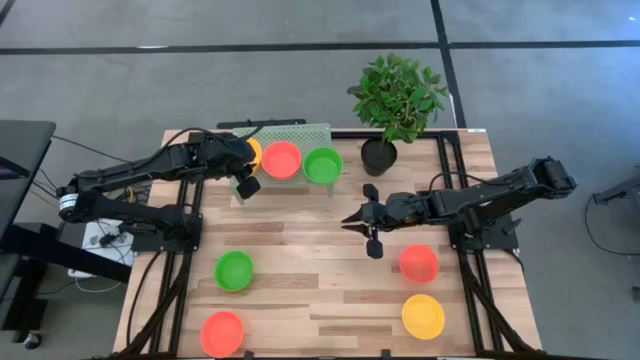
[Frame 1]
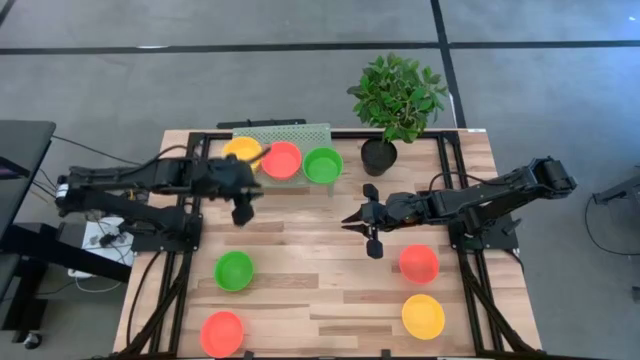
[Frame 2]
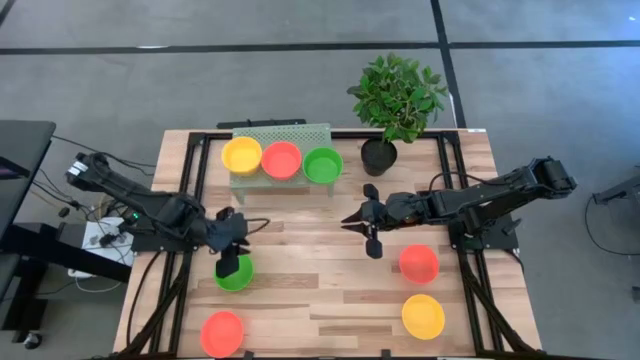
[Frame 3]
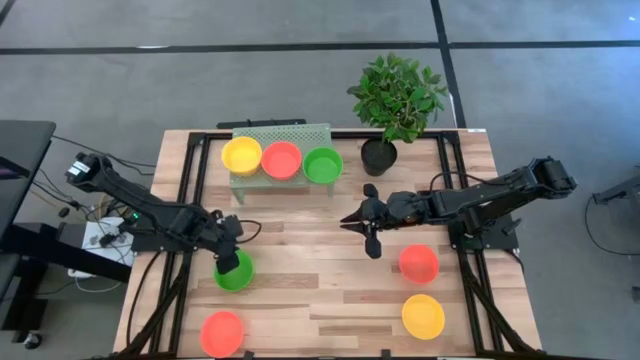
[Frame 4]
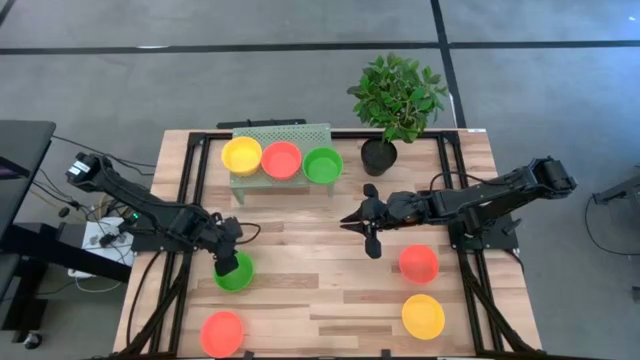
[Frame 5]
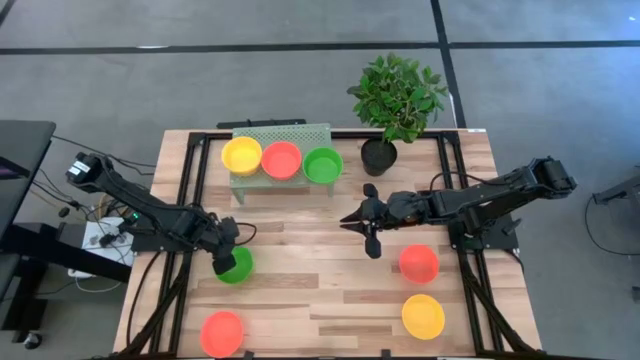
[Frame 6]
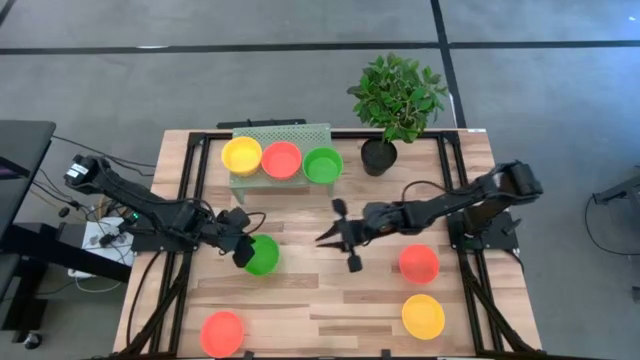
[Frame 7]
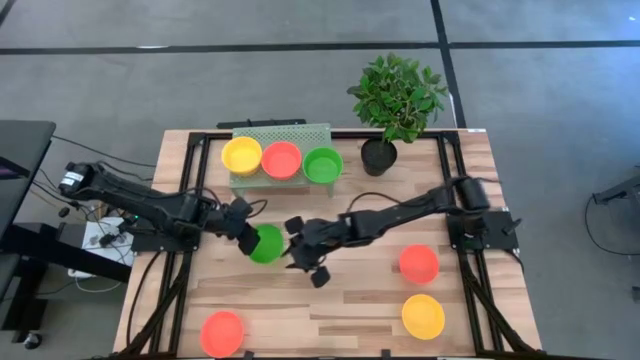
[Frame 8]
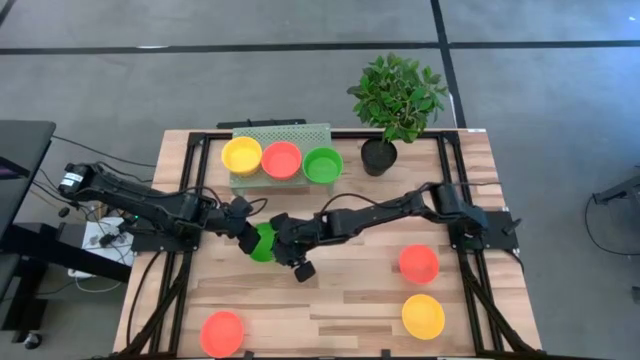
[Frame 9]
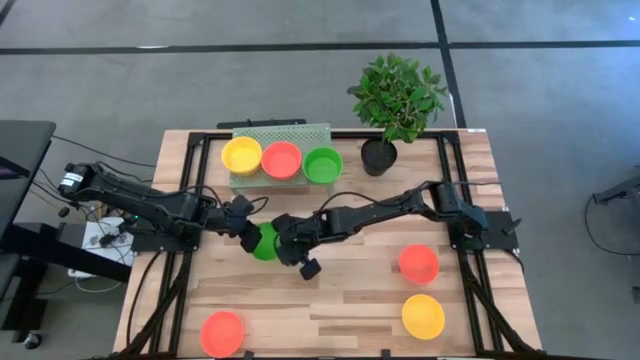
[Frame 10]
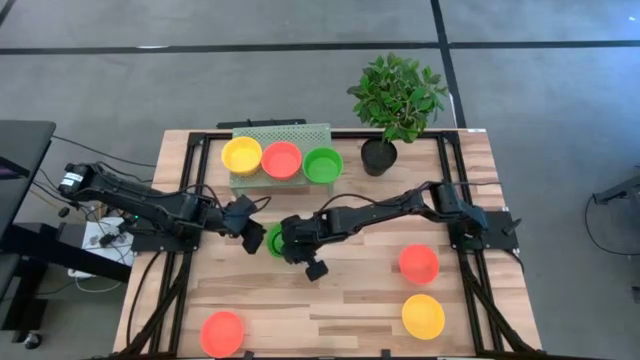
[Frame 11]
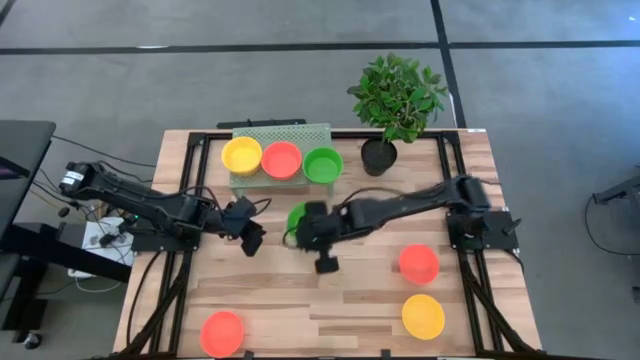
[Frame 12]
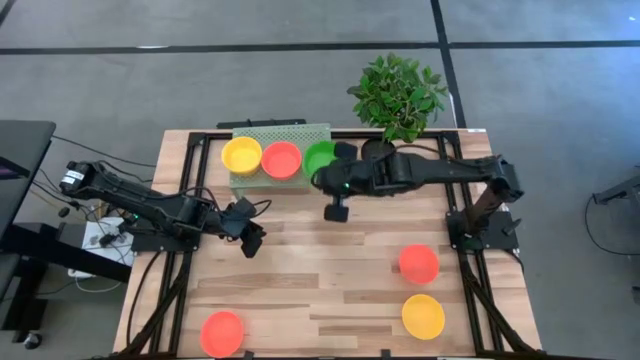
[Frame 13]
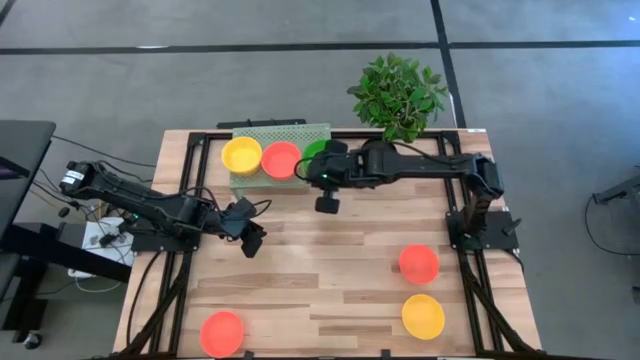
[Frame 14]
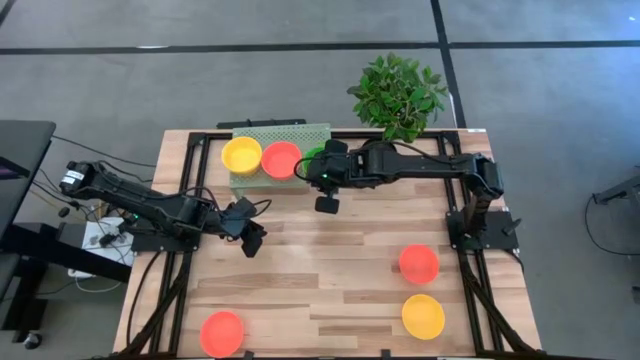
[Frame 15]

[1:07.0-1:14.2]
Task: Pick & Place Mini bowls
Stack the green bowl on top of the green bowl on the shelf

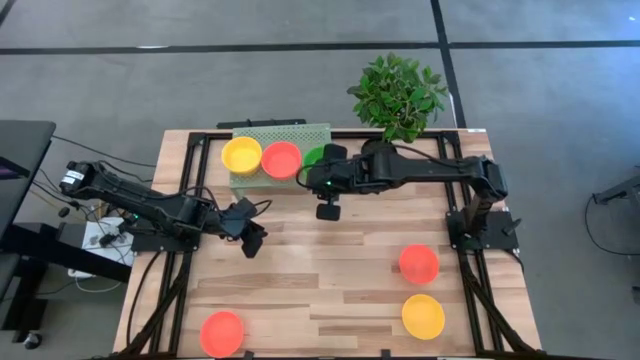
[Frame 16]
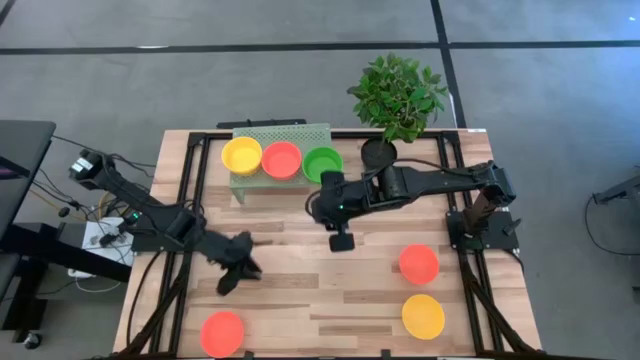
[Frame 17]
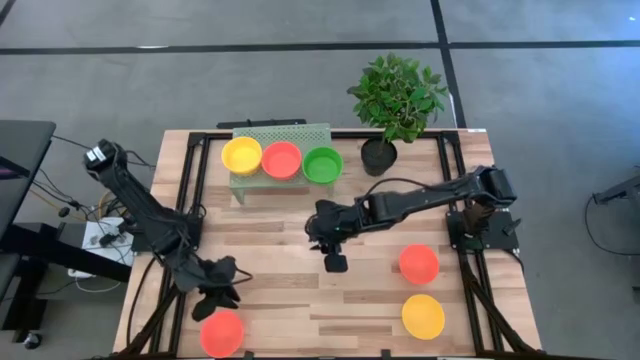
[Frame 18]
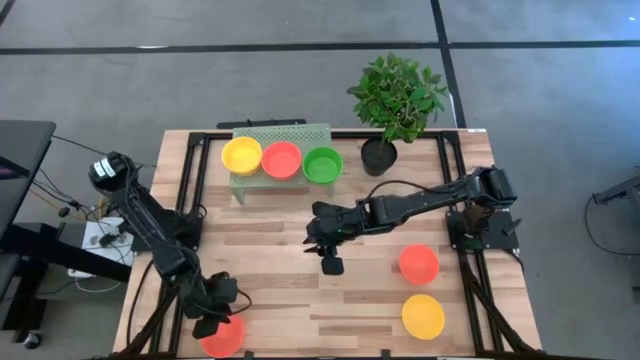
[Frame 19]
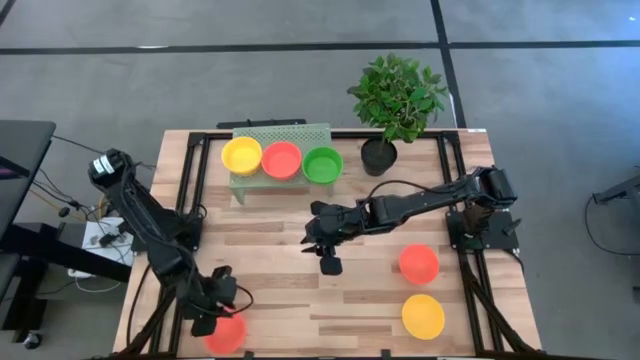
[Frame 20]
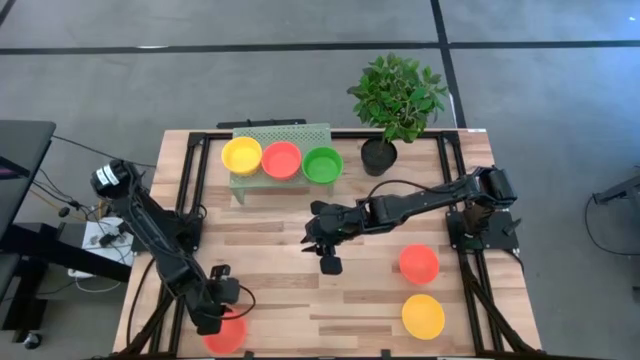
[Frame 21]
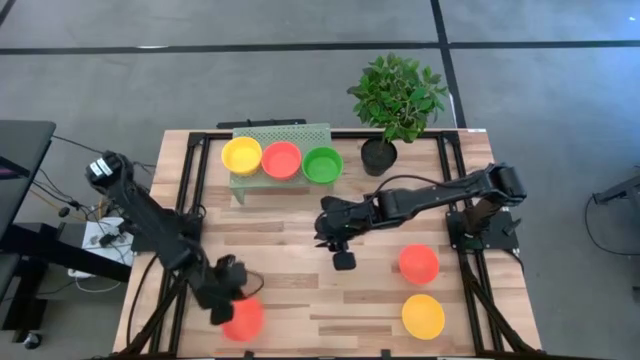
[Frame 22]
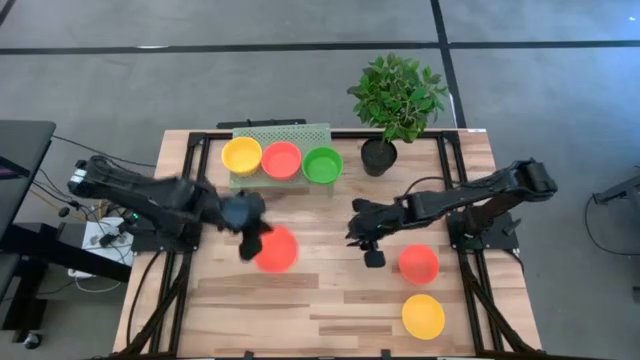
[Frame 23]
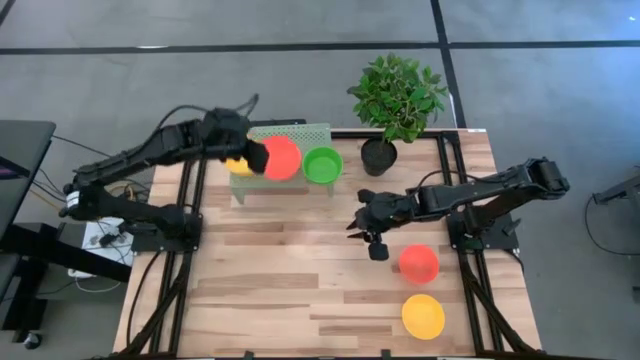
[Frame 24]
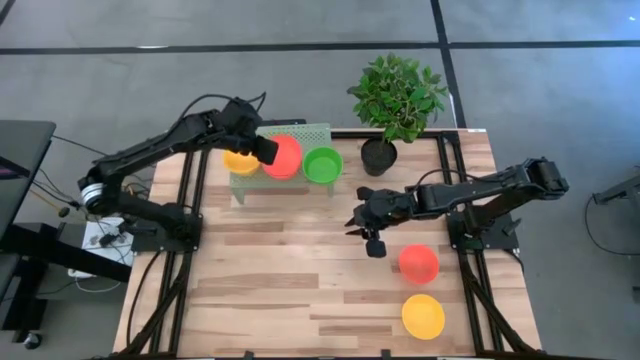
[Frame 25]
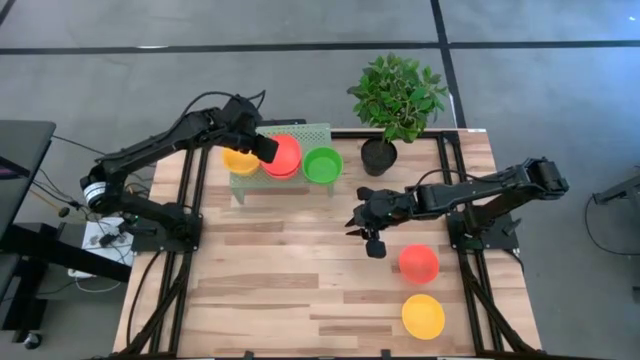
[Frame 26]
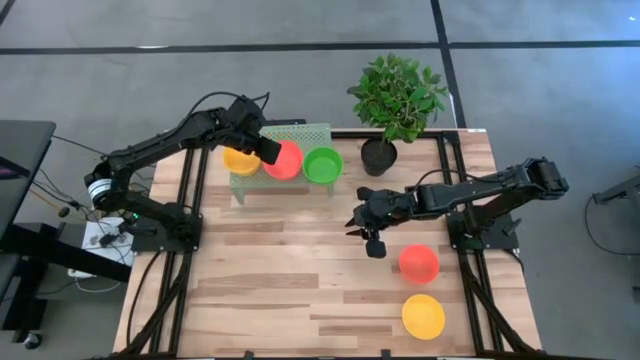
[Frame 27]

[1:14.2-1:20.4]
Stack the orange bowl on top of the orange bowl on the shelf

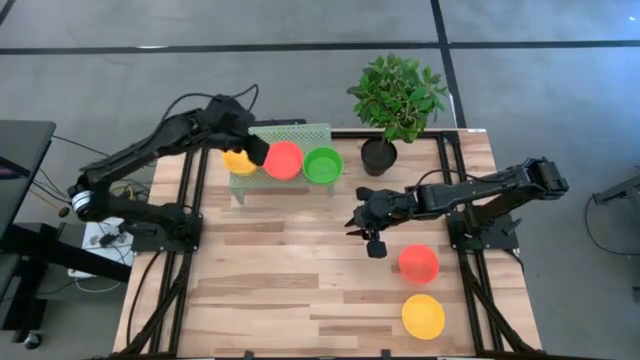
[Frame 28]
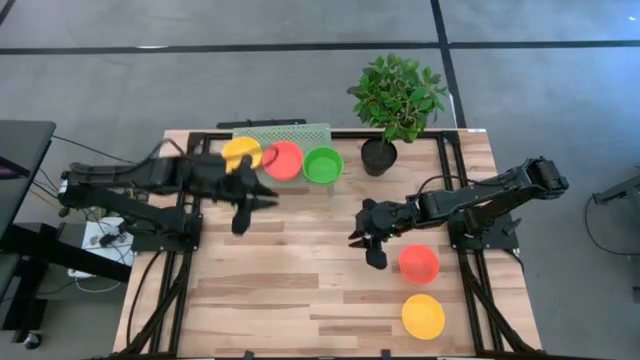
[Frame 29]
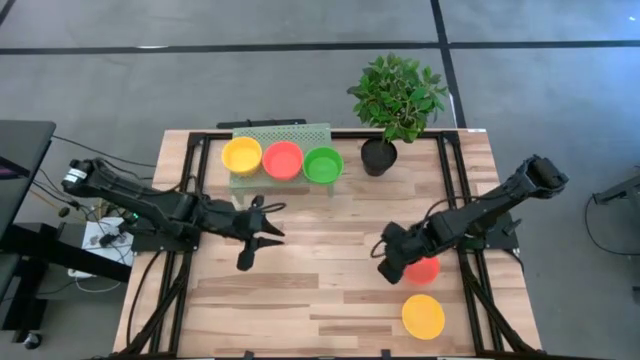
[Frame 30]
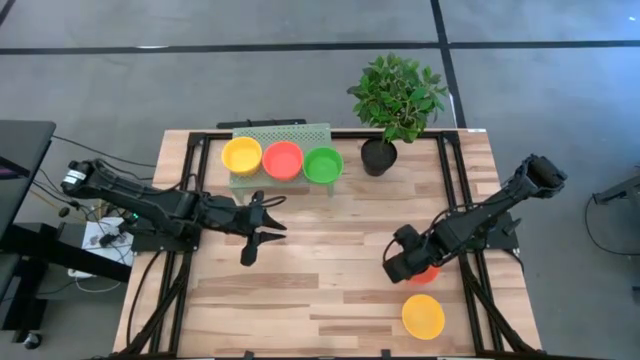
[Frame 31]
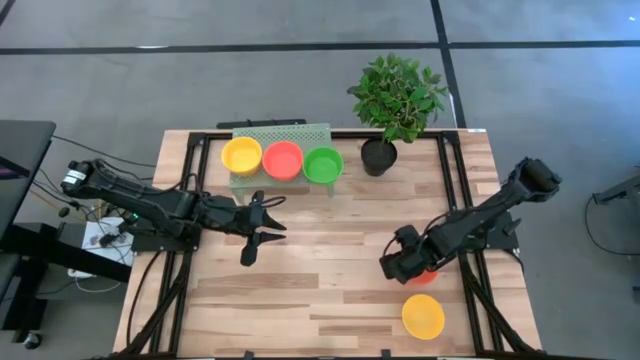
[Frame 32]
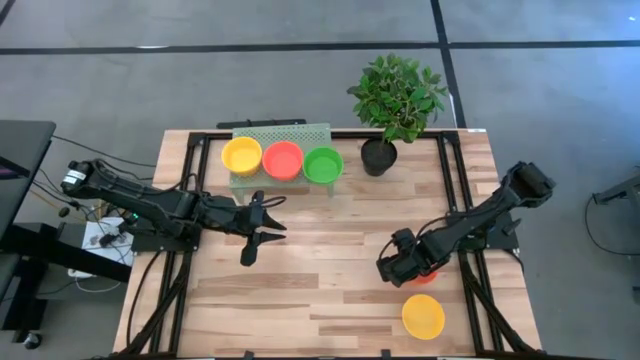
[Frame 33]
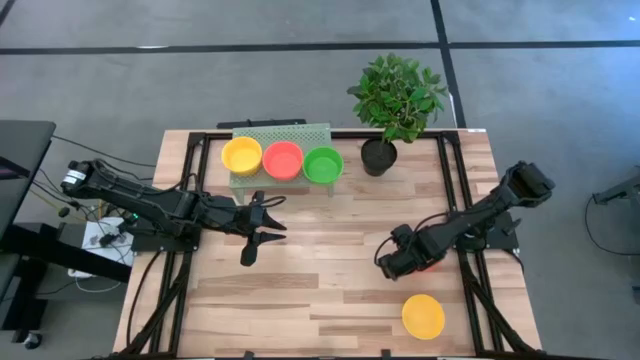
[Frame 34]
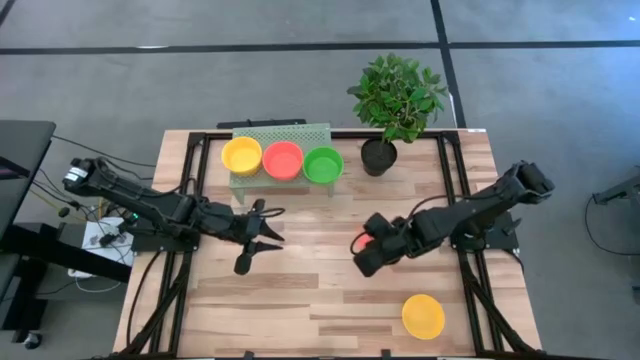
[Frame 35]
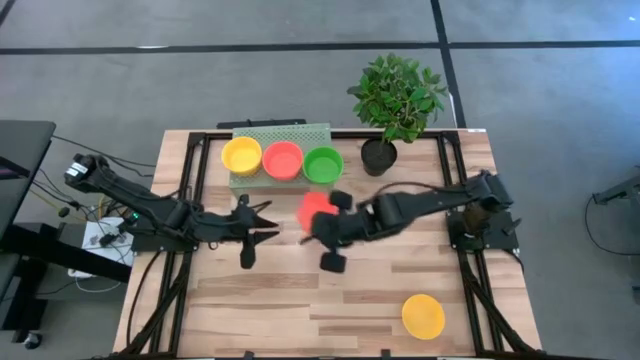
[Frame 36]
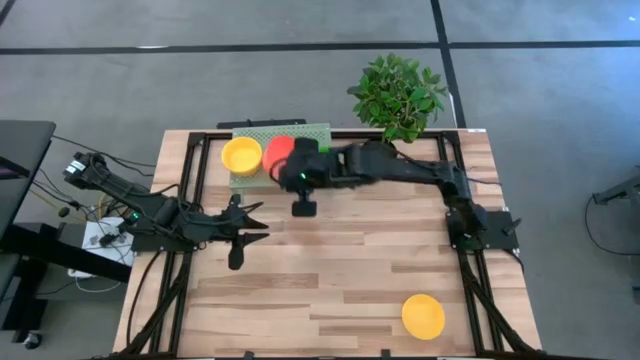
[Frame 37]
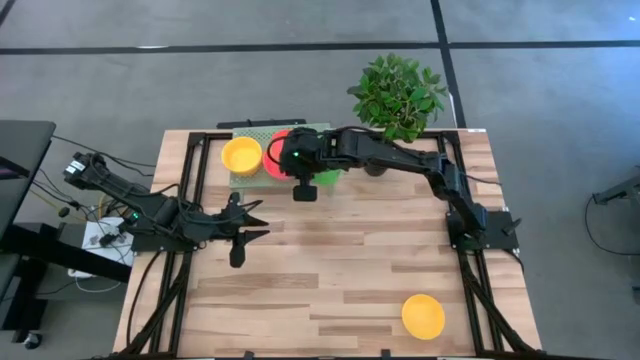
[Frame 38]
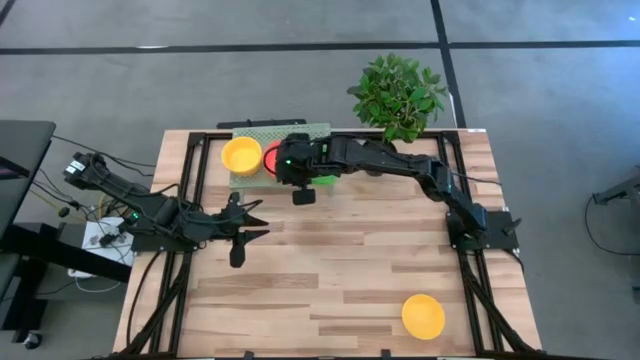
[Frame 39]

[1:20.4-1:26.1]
Stack the orange bowl on top of the orange bowl on the shelf

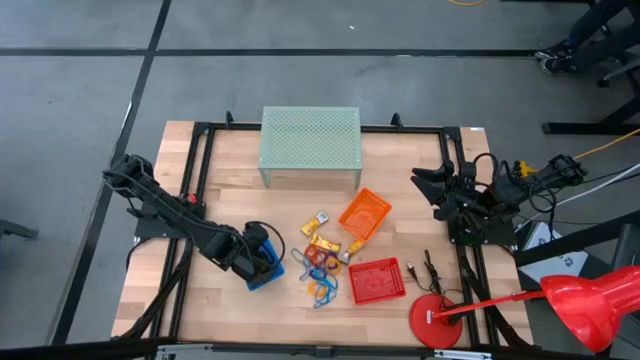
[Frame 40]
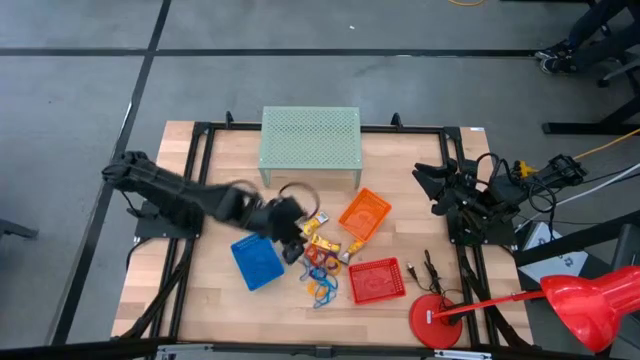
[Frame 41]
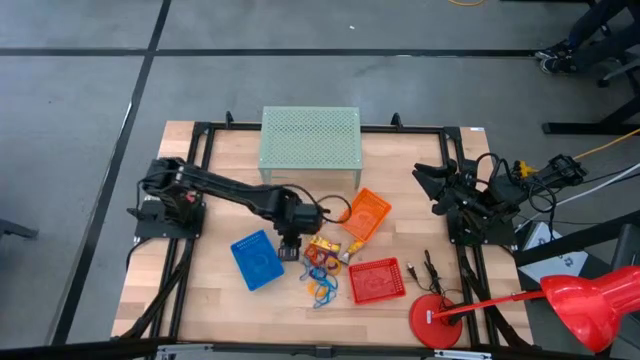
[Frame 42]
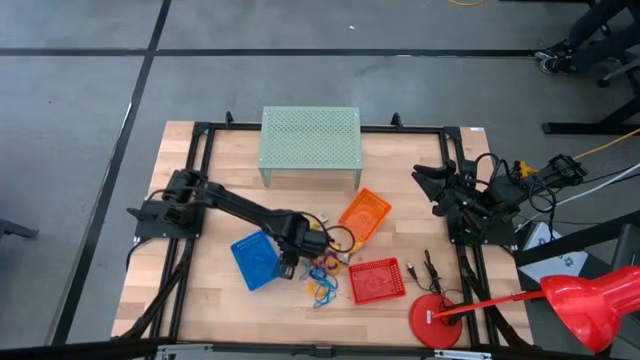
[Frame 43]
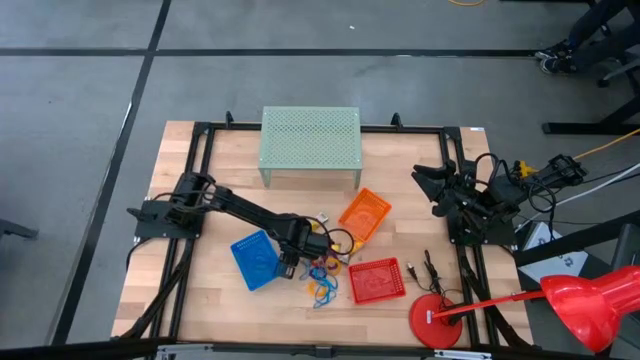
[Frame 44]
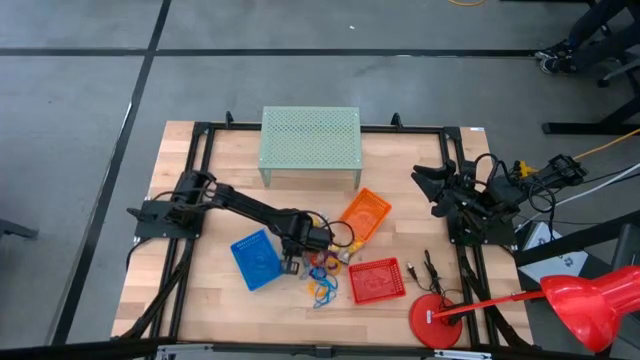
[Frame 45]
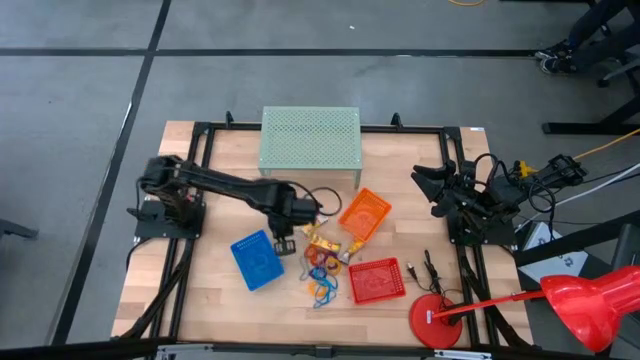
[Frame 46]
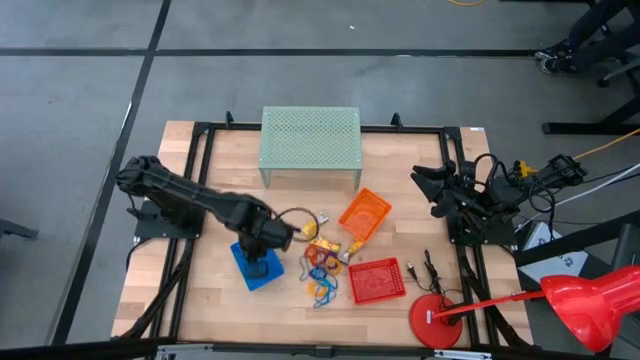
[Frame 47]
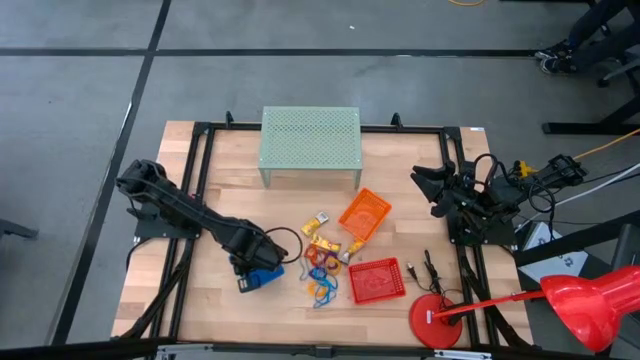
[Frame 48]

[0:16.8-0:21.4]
Task: Pick & Place Office Desk Supplies
Put the blue rubberband into the blue bin
